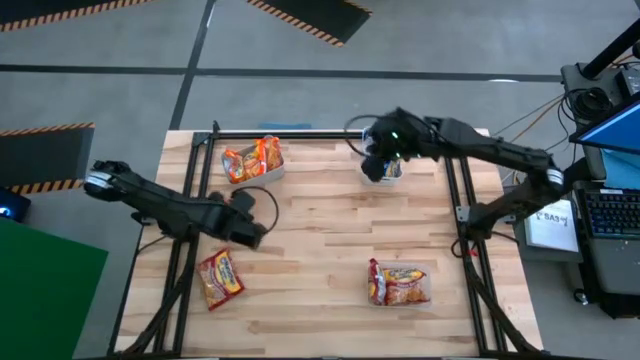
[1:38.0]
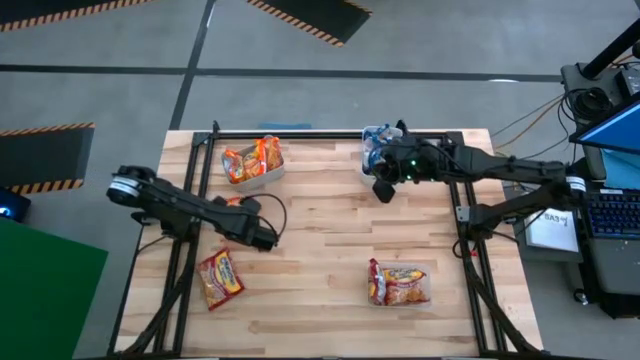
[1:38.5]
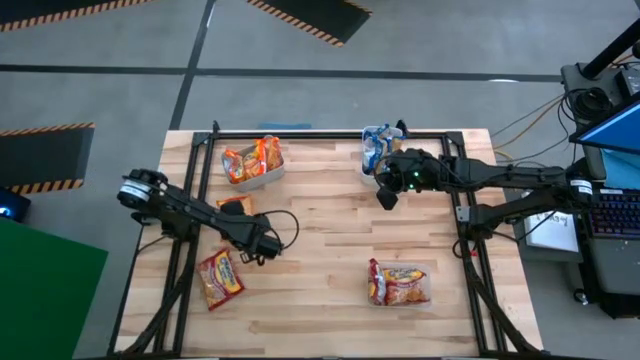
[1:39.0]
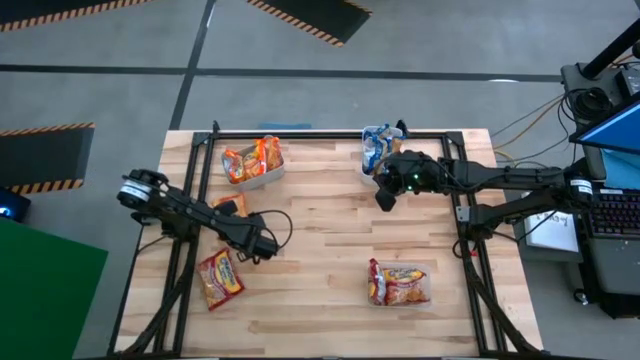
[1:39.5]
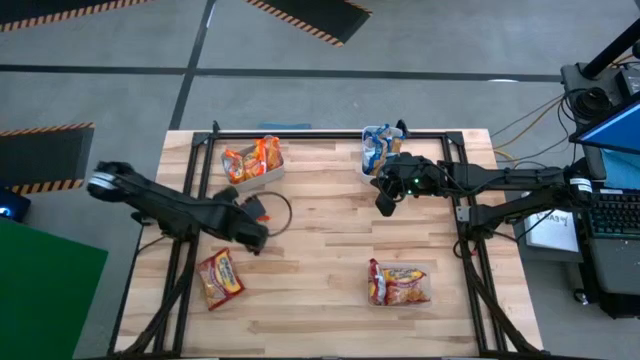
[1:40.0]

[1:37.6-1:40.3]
Task: Sort Maruchan noodles
Put the orange noodle pack into the gray bin

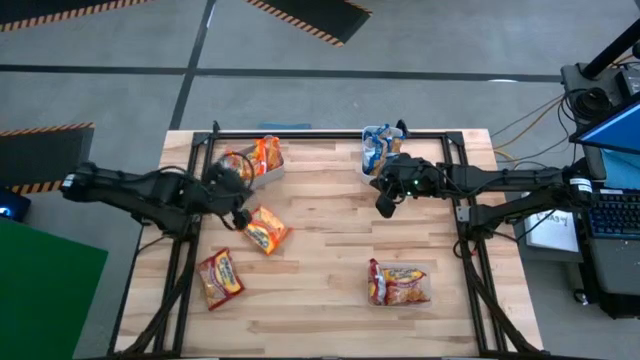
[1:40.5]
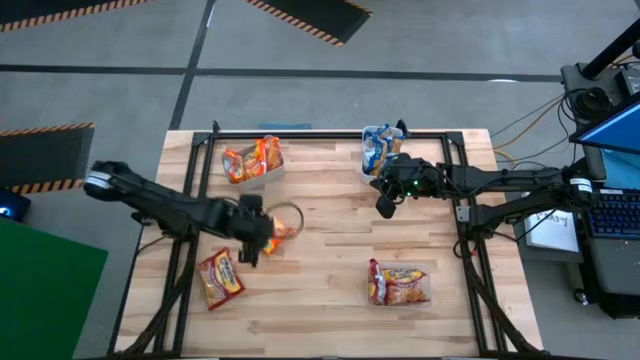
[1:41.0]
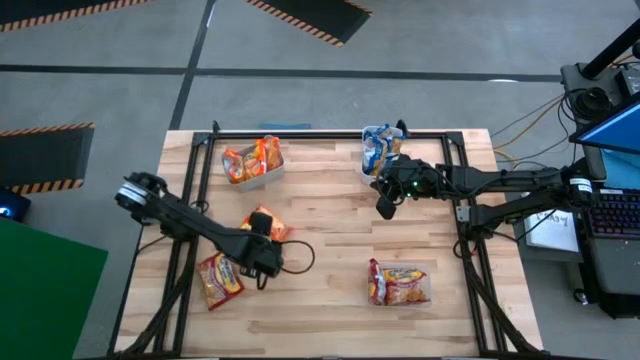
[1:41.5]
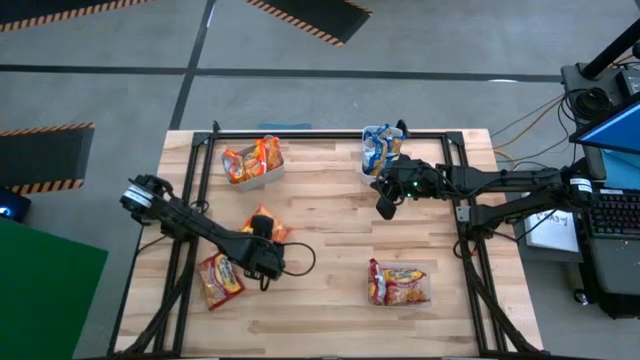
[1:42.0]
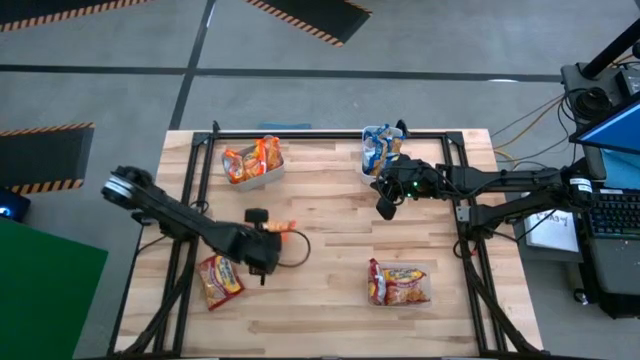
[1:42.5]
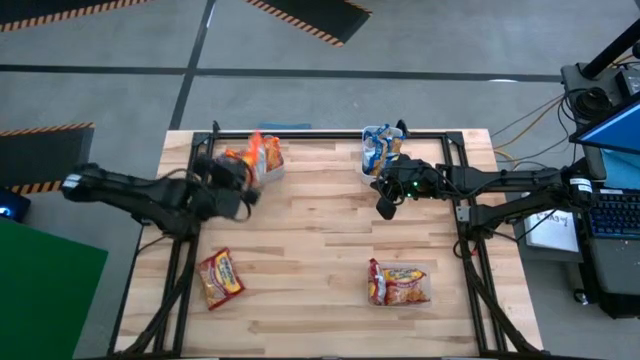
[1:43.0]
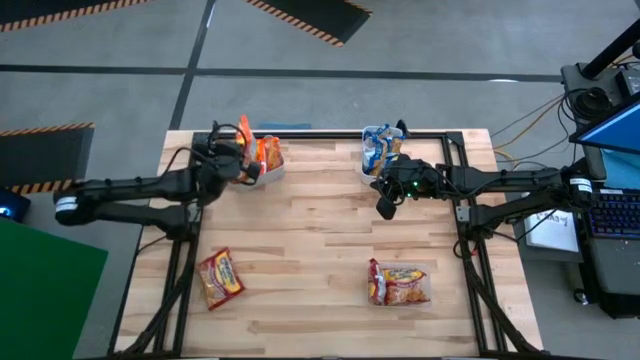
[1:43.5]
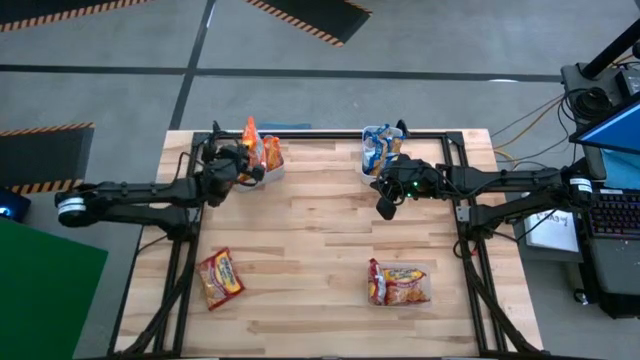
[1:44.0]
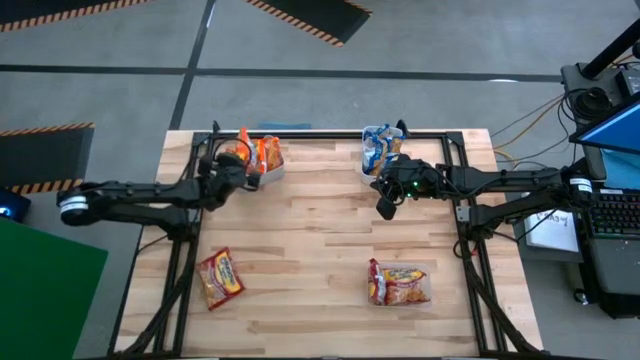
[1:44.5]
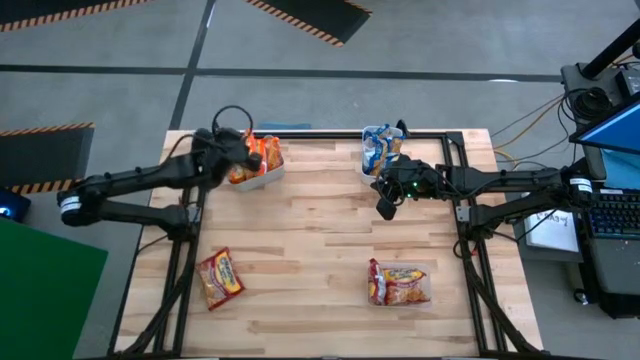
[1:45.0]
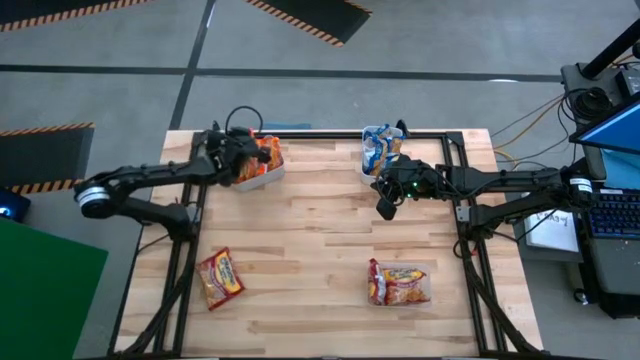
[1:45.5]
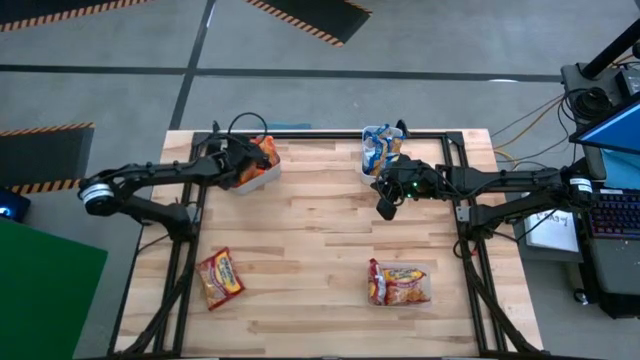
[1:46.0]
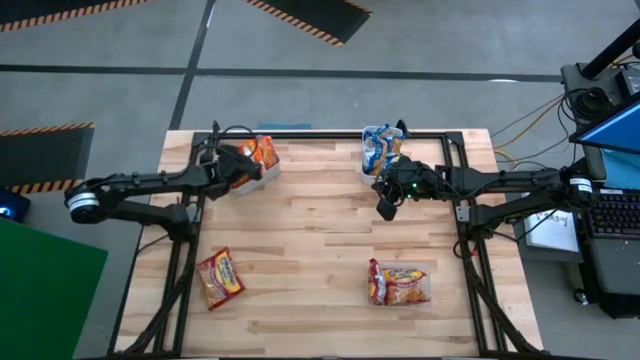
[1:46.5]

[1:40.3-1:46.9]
Put the red noodle pack into the transparent bin

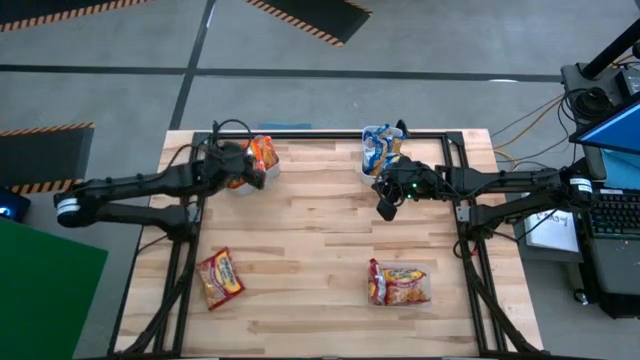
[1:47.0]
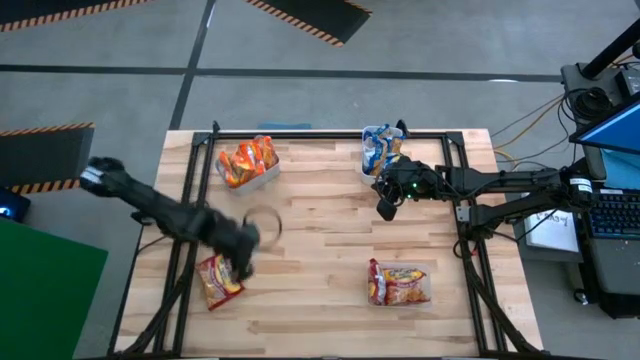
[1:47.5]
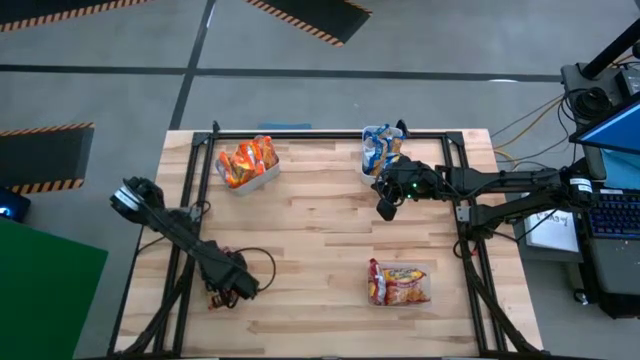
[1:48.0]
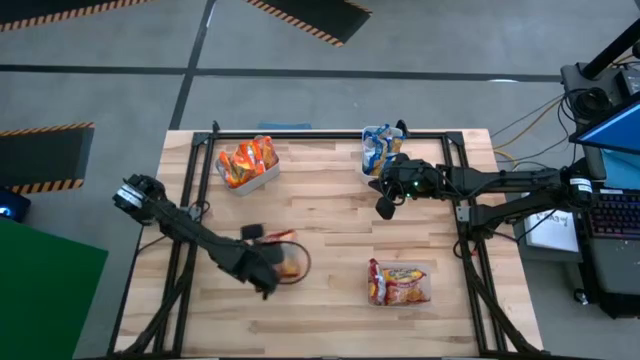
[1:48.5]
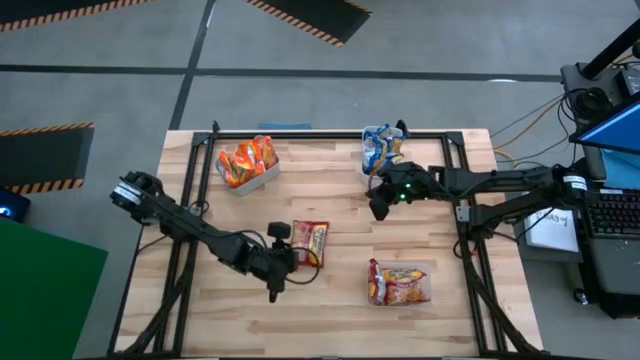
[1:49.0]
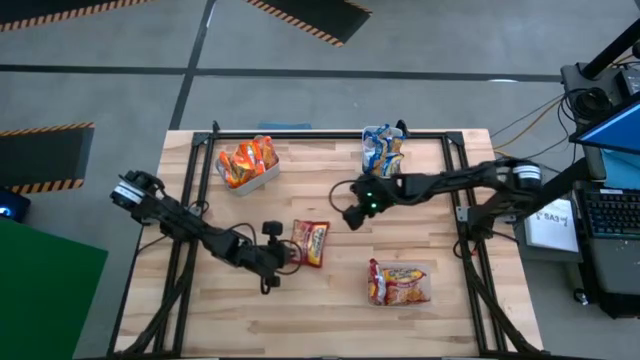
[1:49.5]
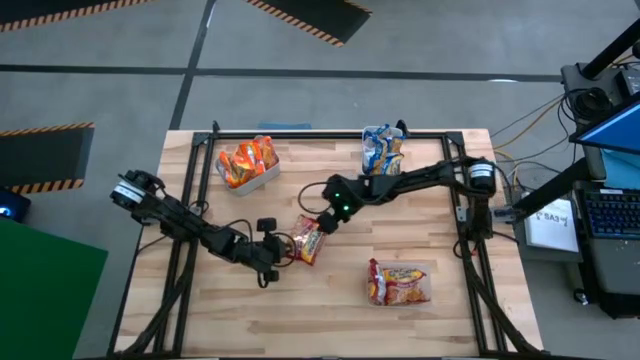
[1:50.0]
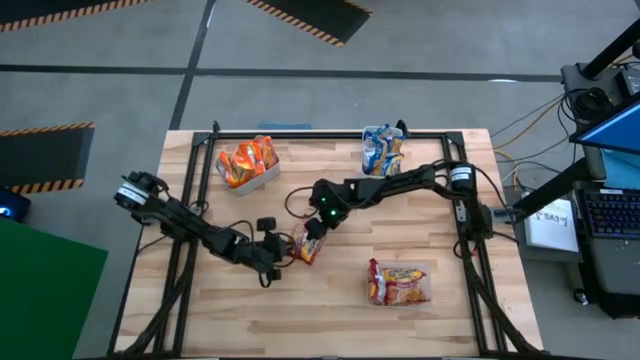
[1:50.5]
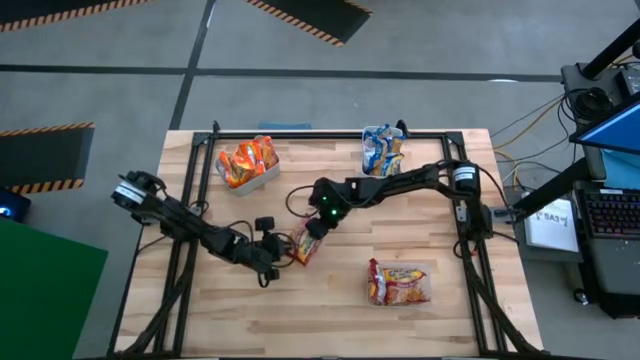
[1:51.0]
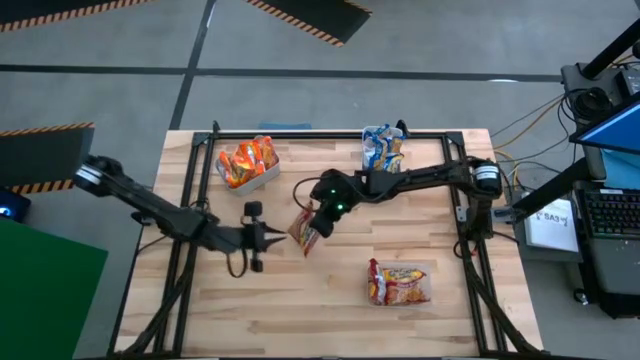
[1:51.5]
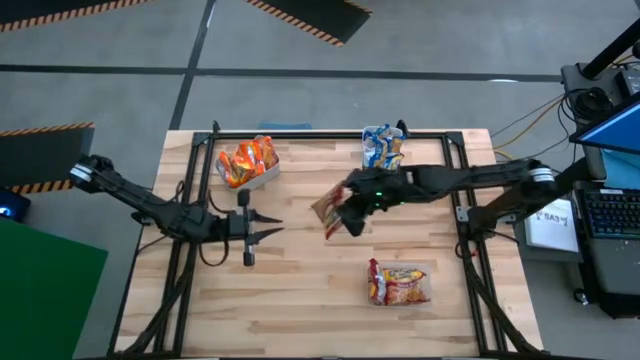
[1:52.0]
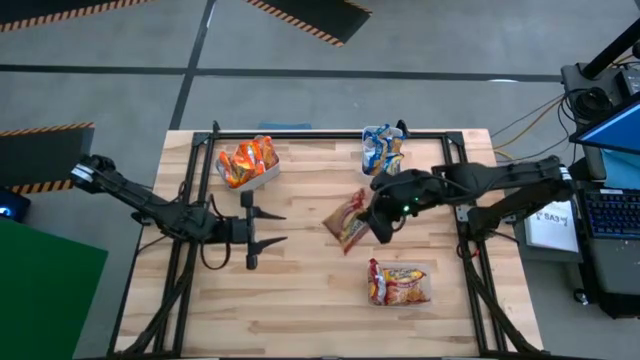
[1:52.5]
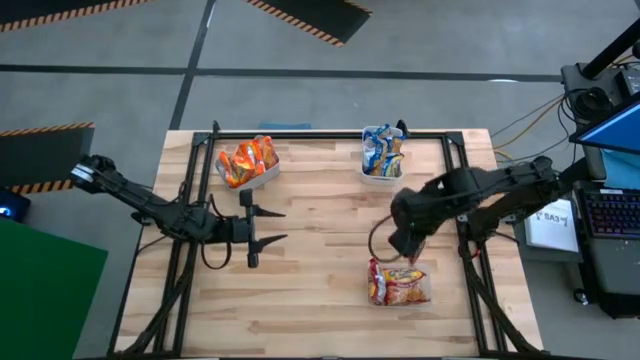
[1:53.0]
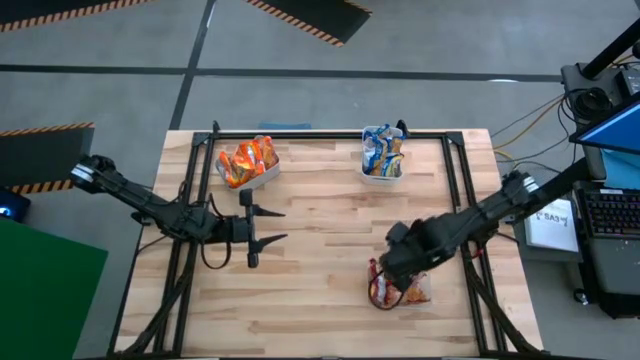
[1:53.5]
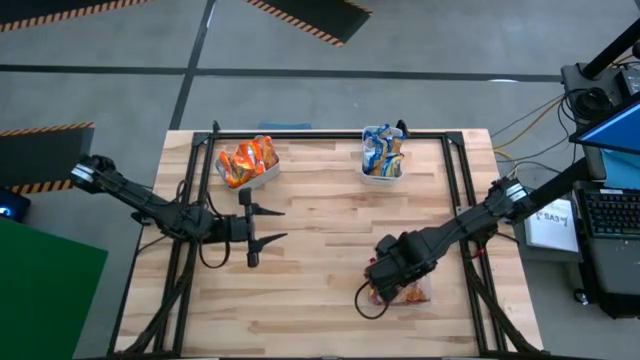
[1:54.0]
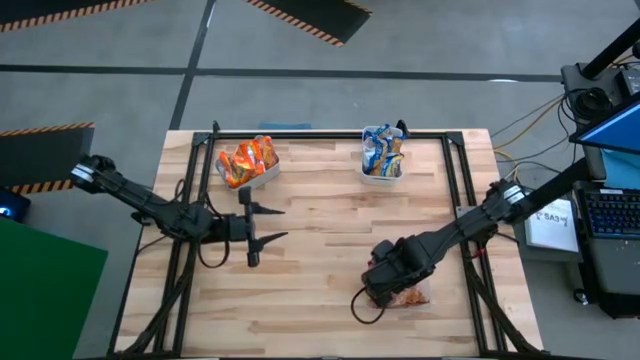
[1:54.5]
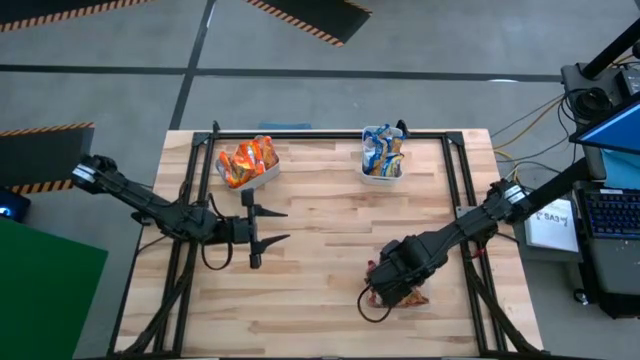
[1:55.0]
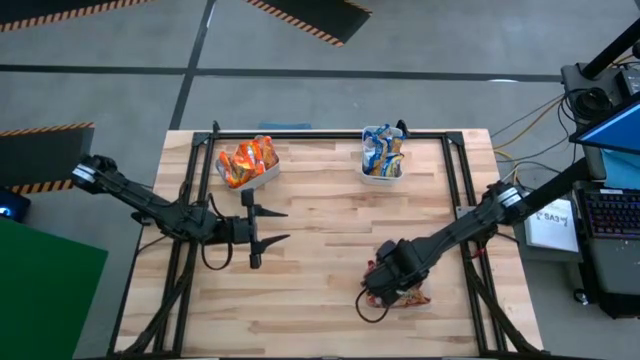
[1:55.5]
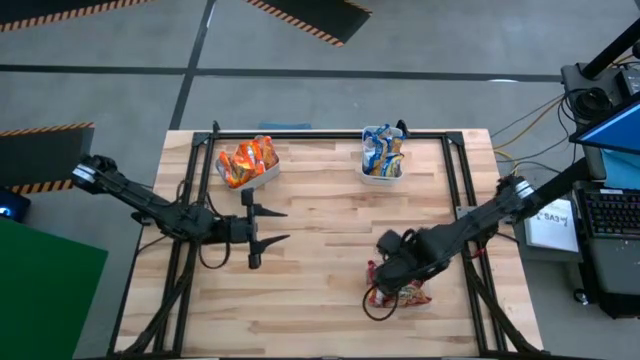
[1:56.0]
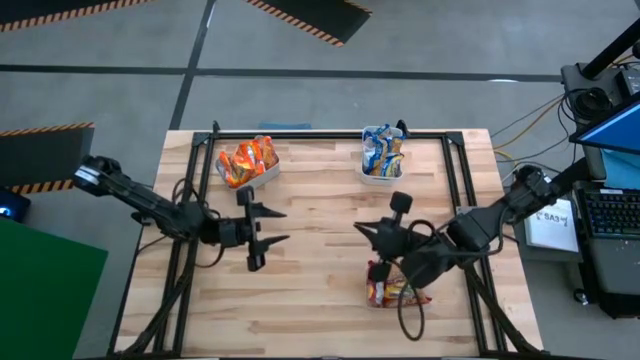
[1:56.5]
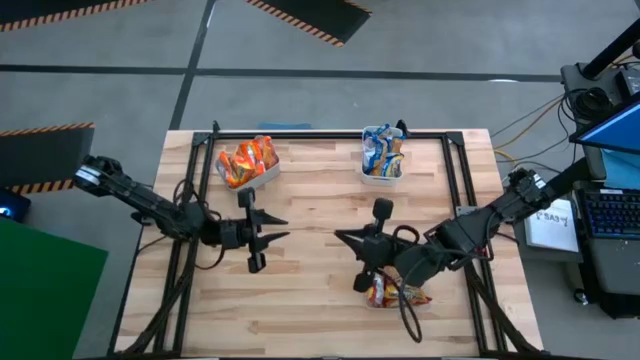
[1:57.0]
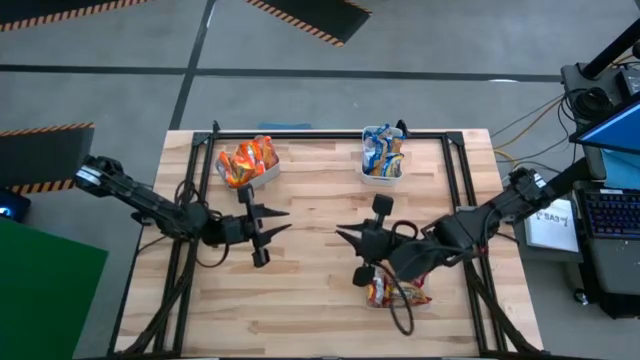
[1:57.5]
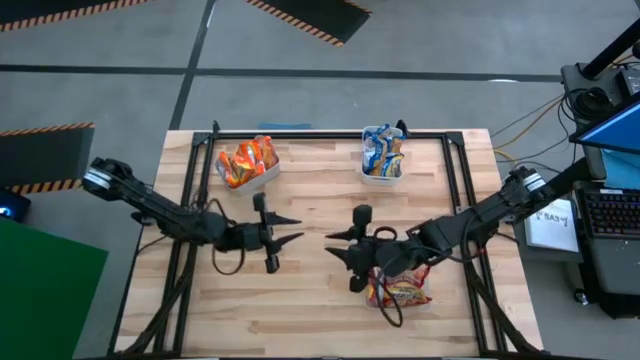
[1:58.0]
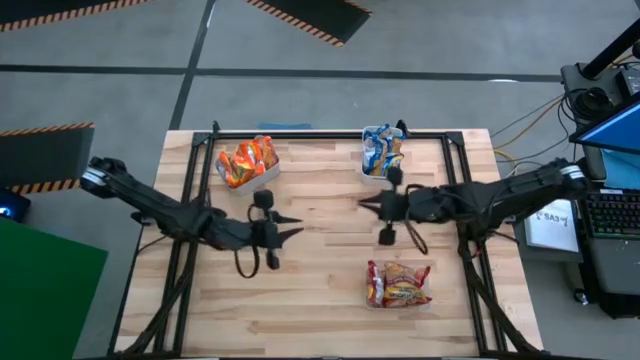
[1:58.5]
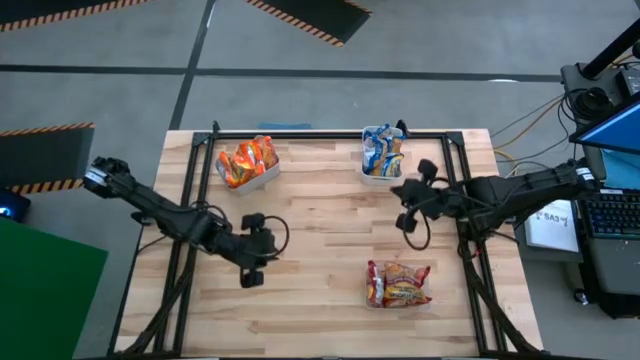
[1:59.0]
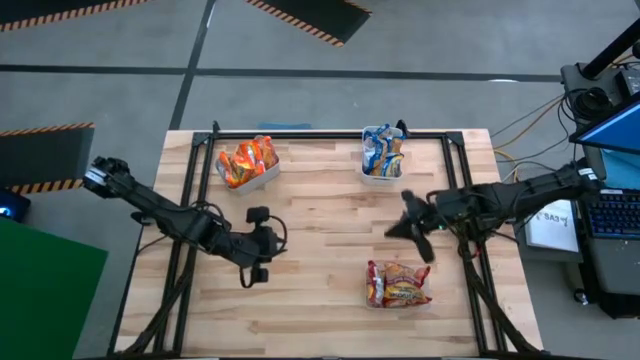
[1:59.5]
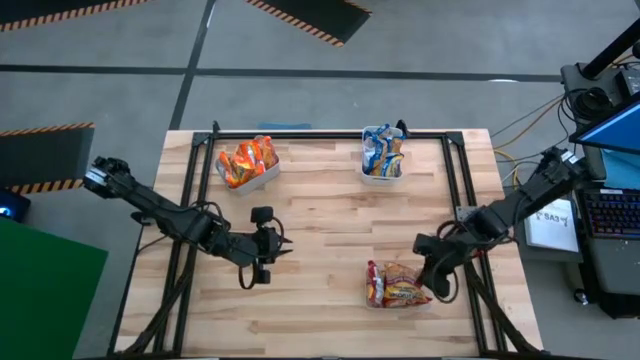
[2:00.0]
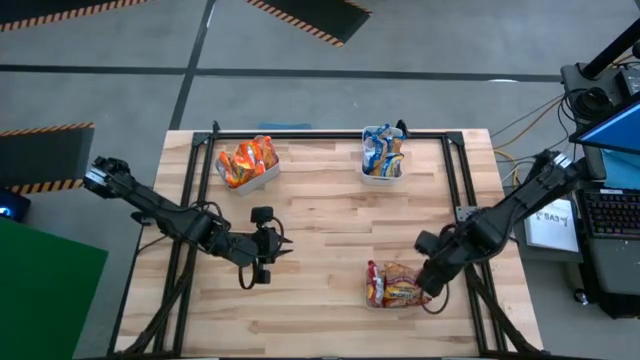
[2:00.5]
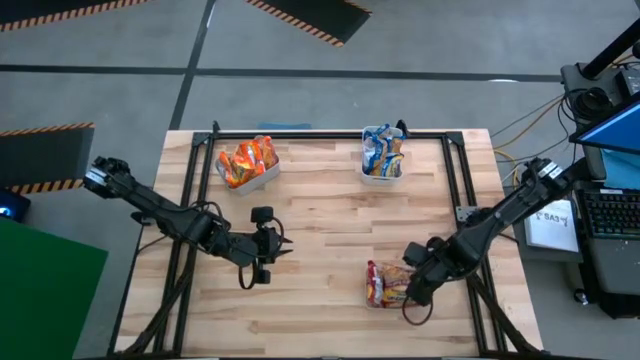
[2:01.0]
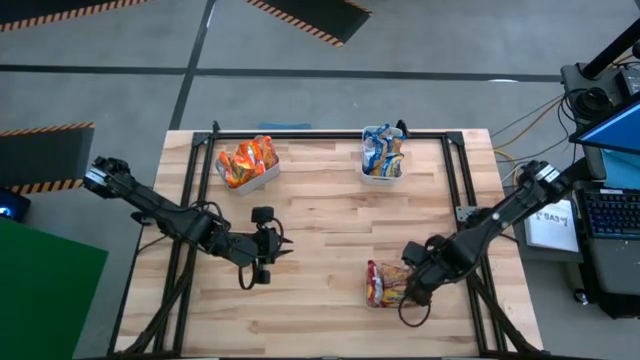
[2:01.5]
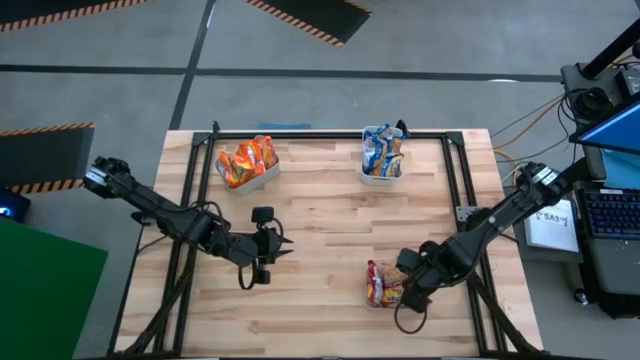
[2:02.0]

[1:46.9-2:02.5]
Put the red noodle pack into the transparent bin
